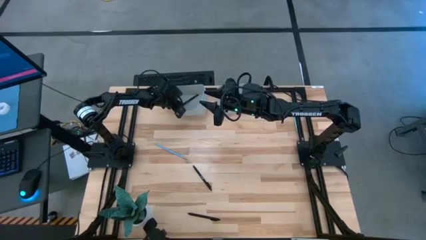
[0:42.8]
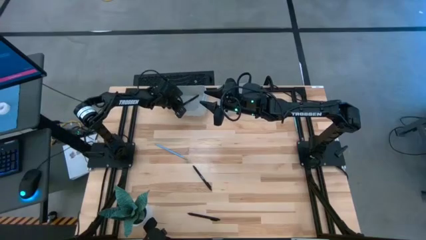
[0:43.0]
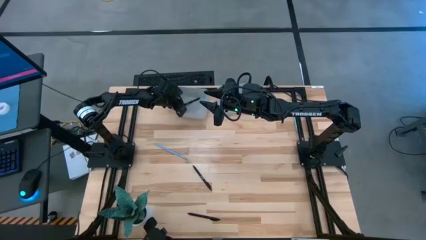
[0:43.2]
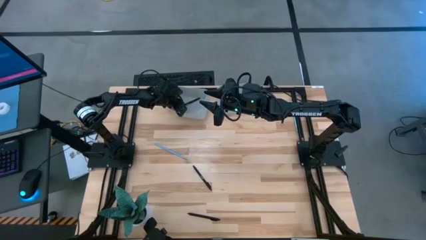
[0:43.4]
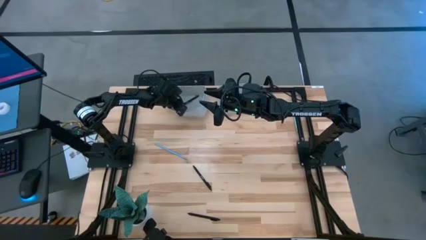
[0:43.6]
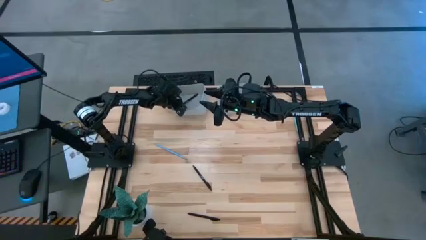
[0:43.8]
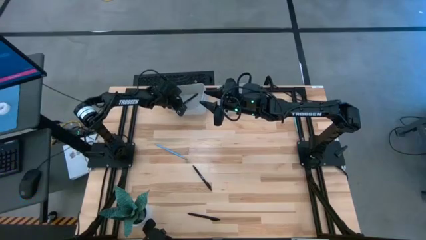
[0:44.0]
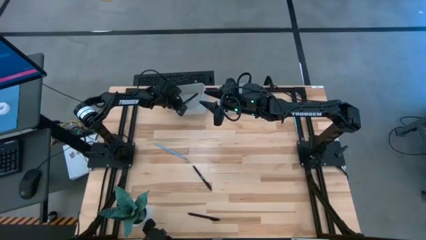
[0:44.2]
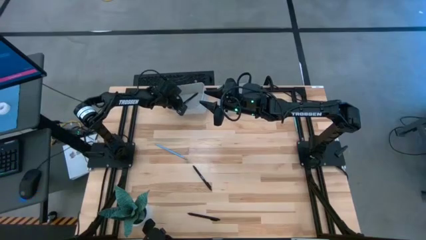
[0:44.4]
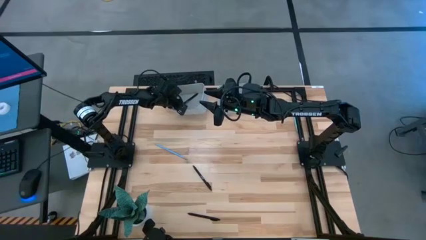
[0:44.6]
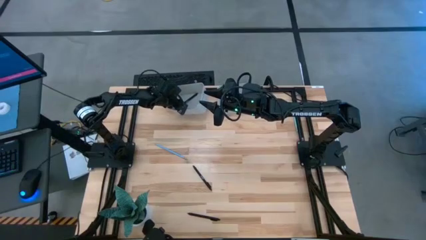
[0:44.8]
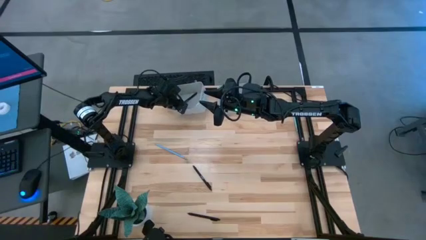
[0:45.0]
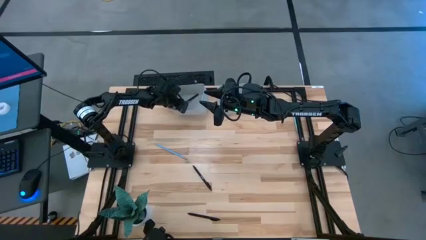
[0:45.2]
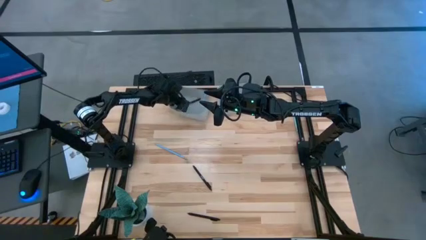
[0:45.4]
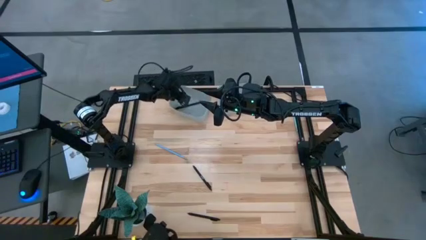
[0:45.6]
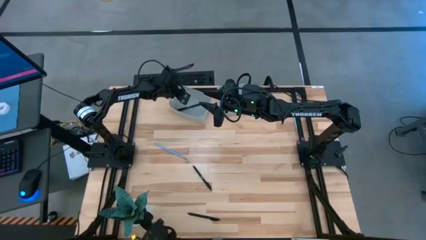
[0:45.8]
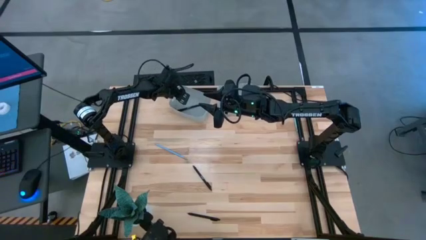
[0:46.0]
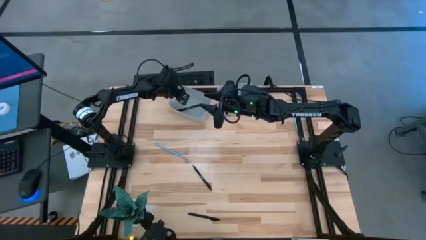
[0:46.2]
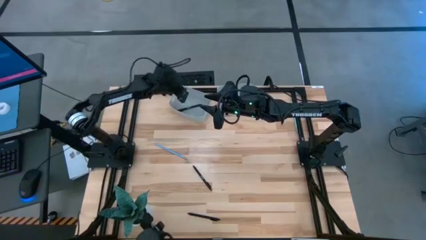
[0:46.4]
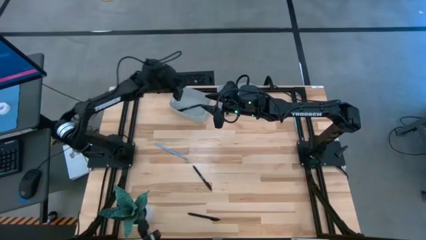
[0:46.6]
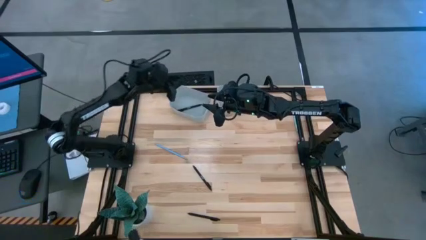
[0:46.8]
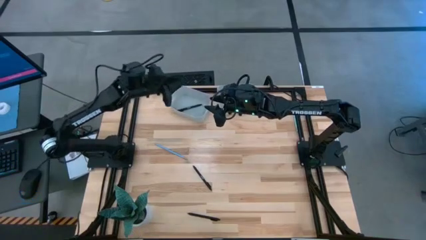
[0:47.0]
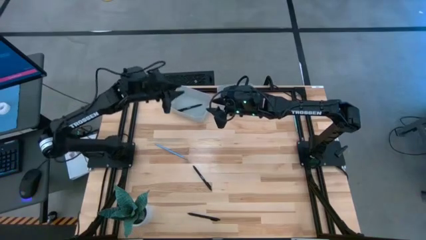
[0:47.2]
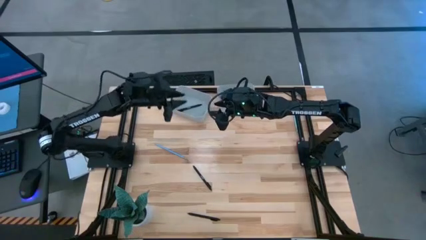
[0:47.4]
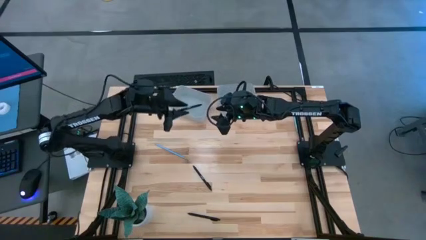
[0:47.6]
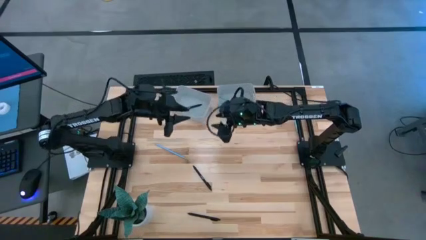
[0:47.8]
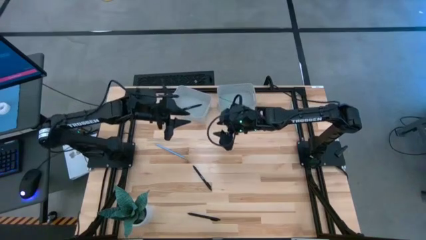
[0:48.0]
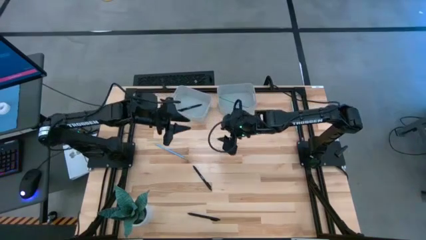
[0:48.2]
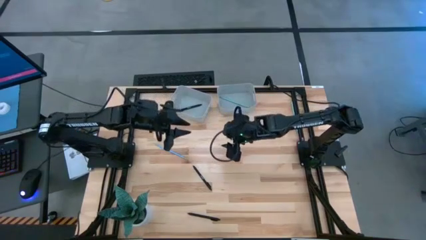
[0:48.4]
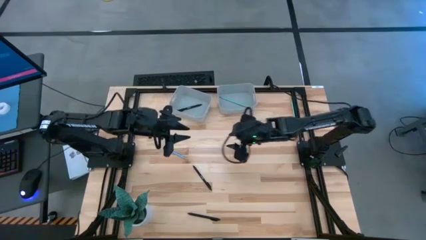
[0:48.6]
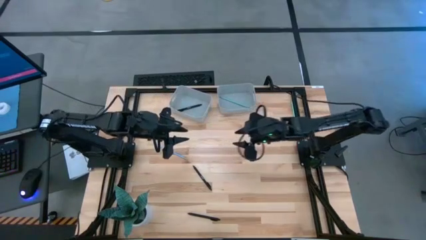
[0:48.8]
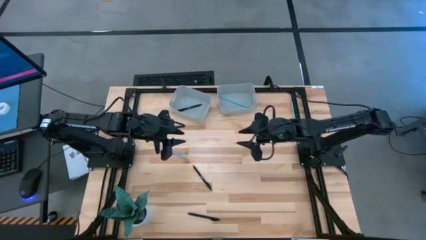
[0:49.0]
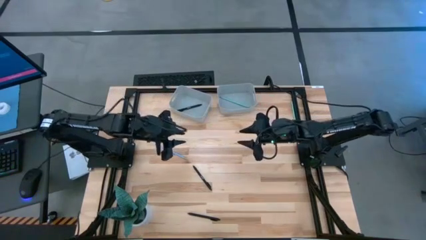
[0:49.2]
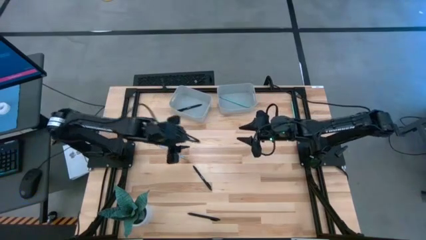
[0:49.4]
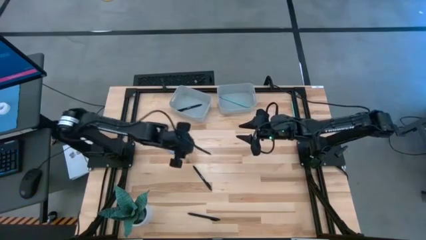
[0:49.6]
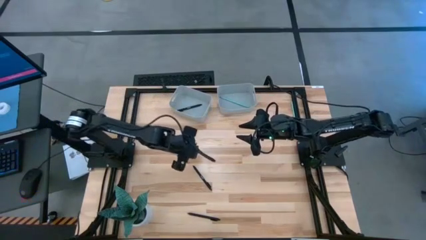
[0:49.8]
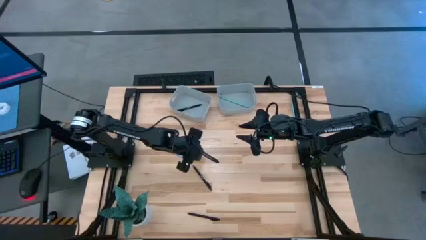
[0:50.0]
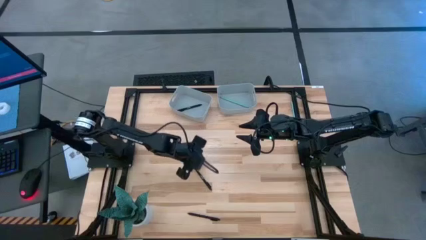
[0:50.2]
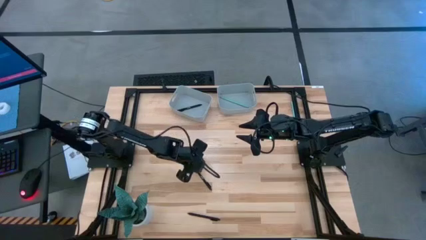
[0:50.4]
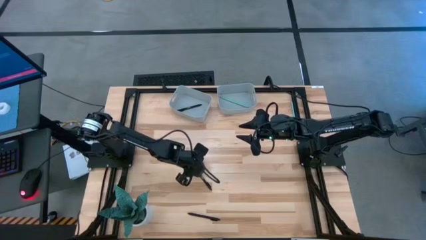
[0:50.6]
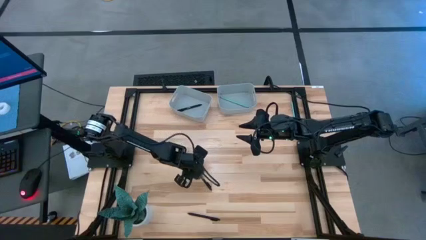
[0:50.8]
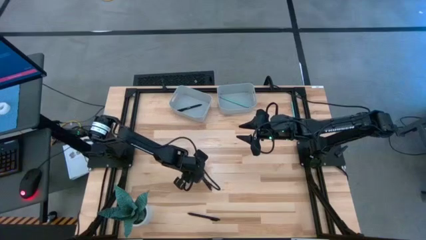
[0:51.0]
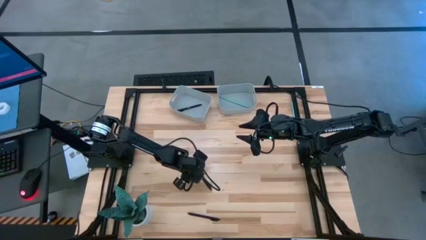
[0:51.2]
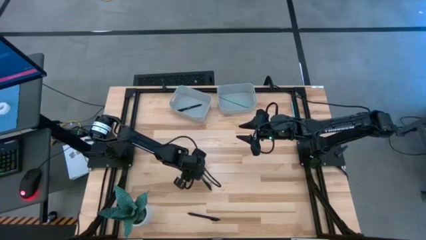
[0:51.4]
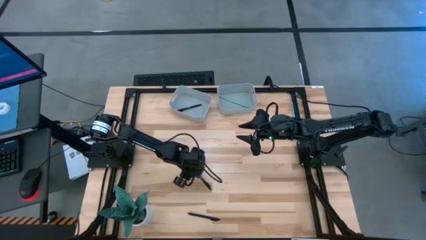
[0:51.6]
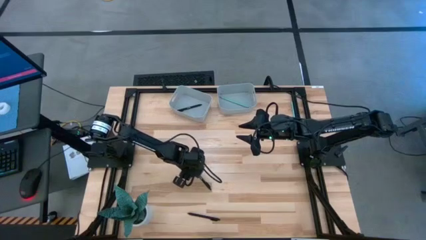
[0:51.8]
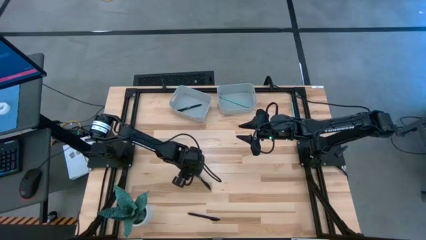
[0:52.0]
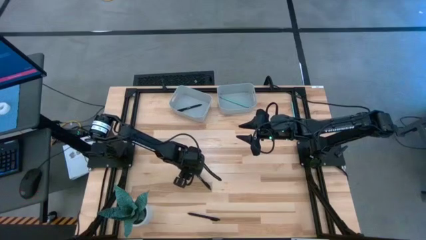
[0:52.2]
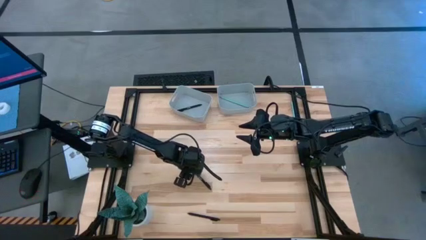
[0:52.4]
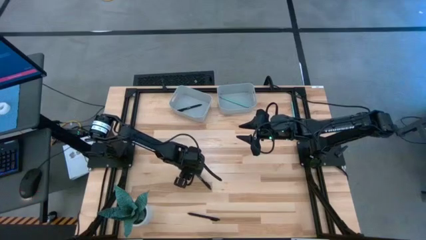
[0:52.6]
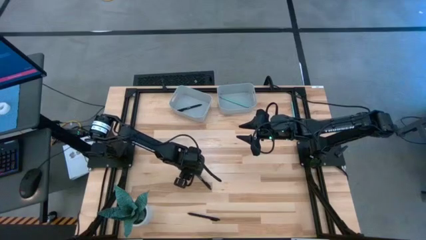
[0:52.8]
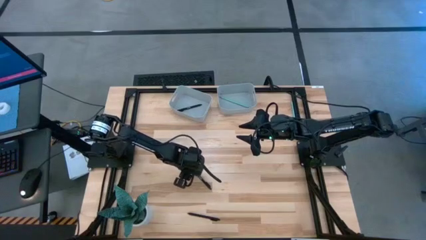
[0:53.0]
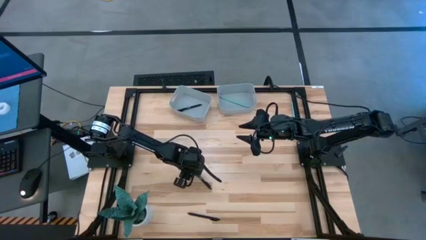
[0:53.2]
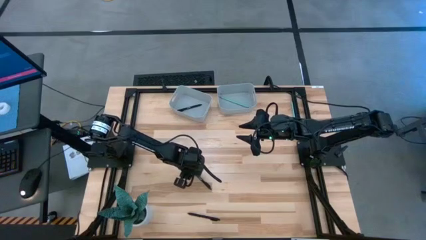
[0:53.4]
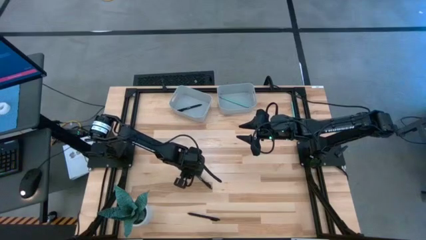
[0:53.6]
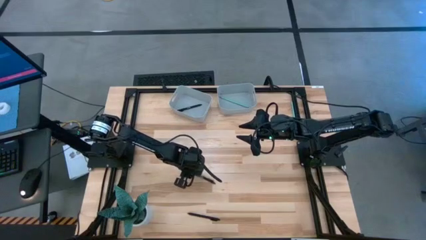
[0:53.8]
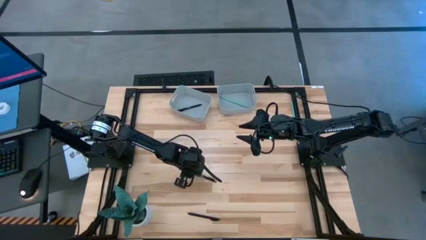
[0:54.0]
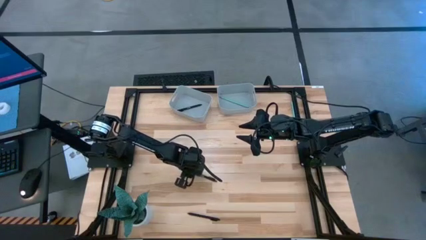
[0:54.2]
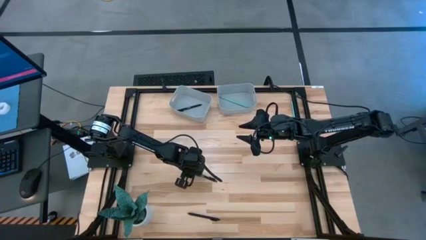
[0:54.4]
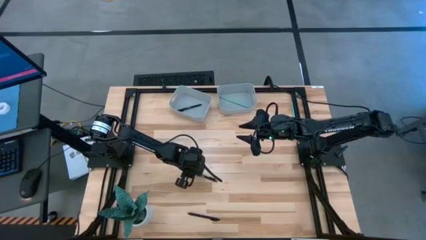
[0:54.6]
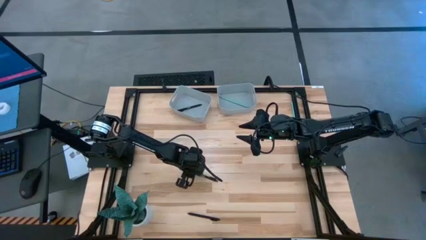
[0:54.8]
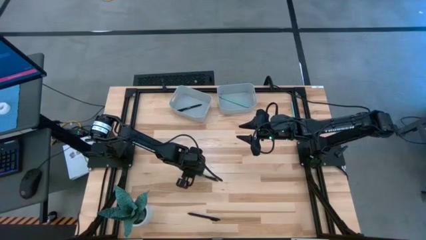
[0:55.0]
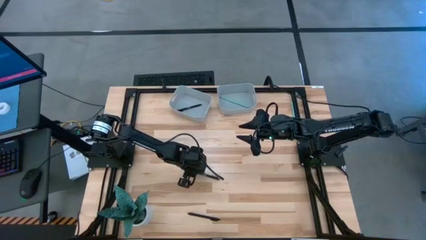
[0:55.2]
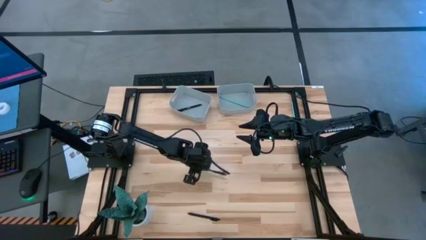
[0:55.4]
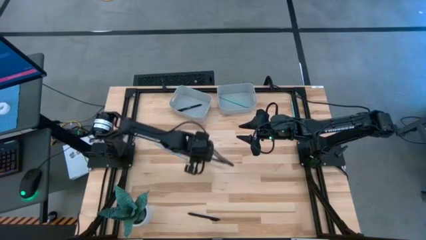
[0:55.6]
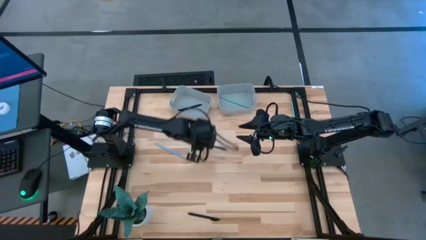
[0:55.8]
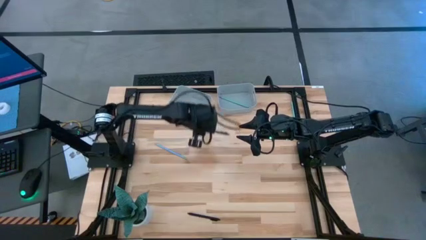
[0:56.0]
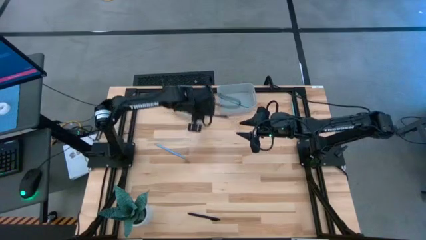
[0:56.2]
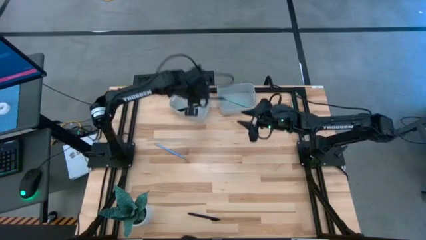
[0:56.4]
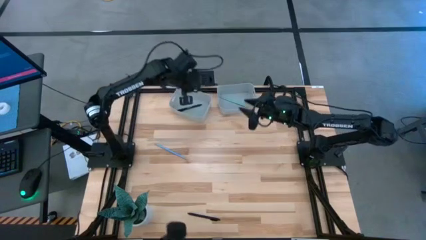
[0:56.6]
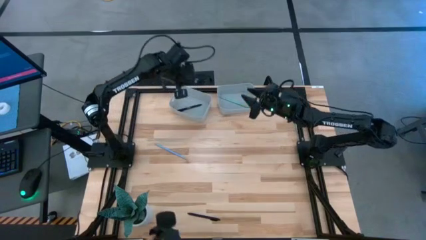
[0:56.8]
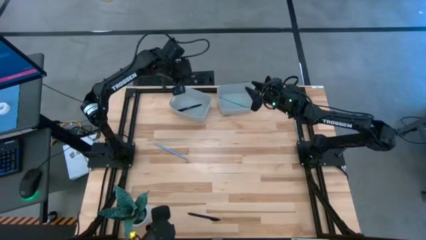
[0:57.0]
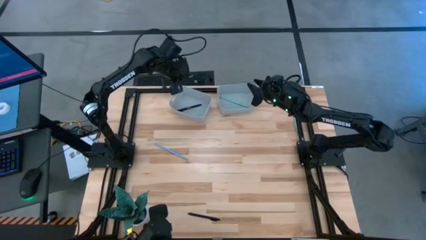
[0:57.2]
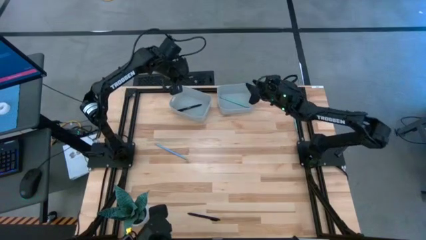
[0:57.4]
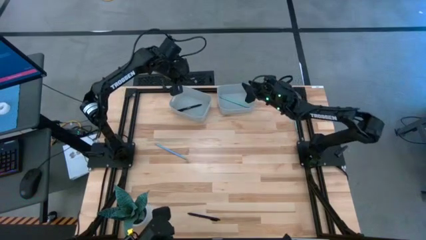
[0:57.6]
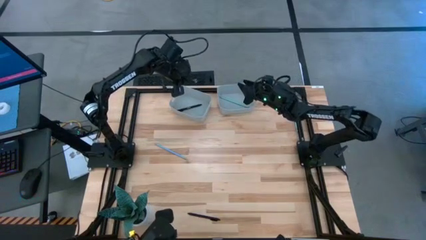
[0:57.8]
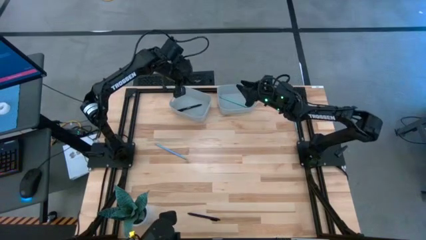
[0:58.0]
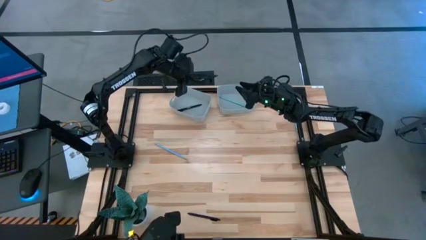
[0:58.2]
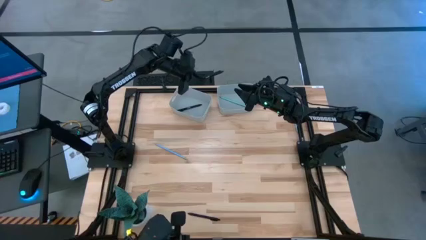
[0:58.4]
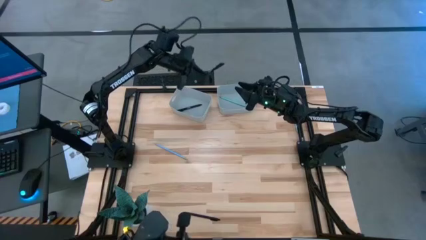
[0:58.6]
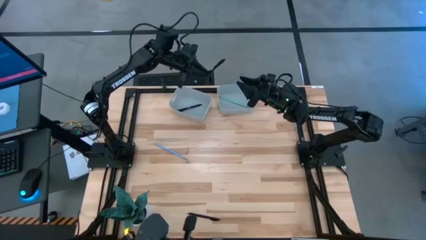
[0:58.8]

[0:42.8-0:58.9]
Task: Sort pens & pencils
Put the top black pen into the left gray bin
